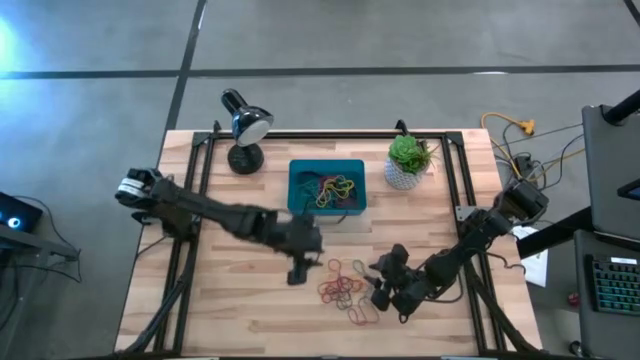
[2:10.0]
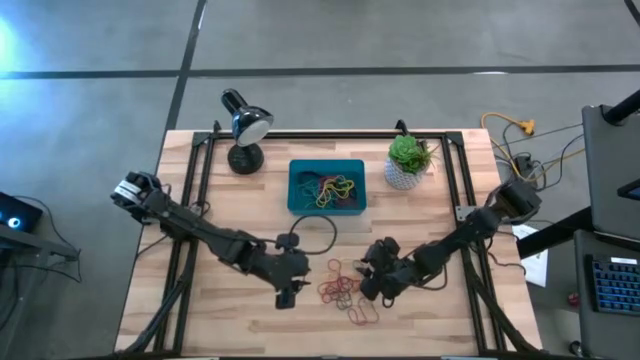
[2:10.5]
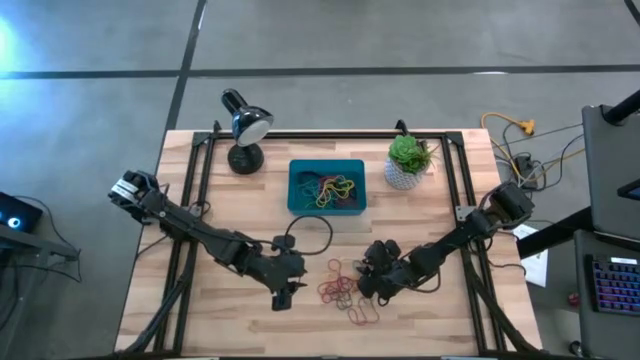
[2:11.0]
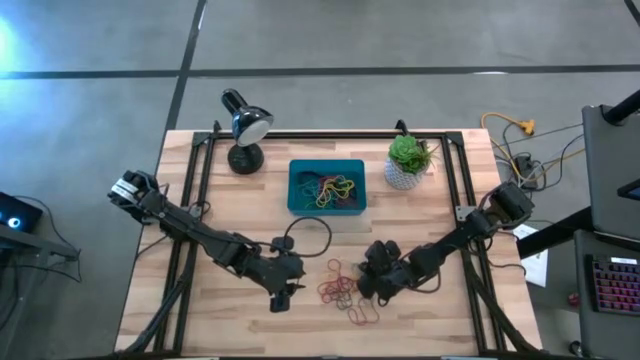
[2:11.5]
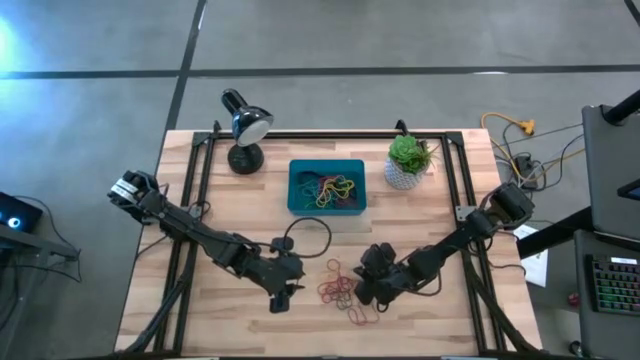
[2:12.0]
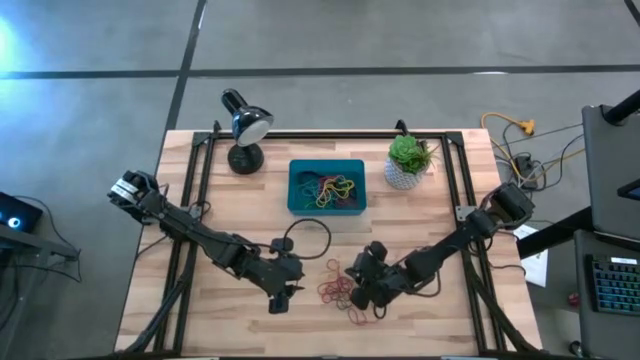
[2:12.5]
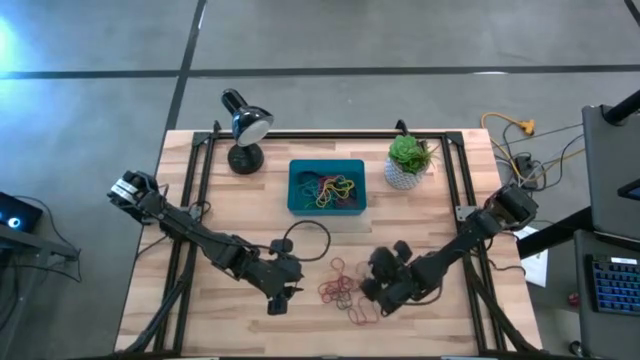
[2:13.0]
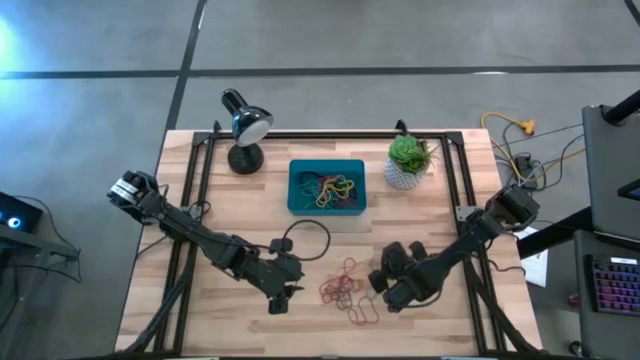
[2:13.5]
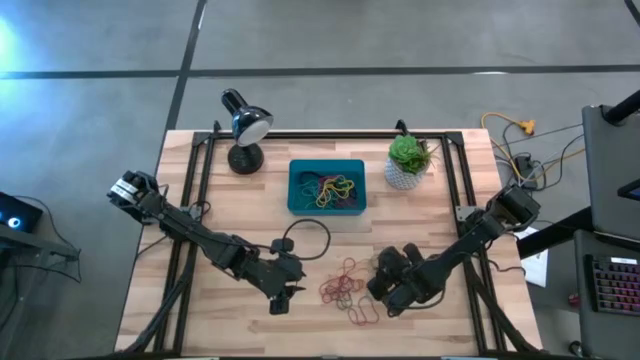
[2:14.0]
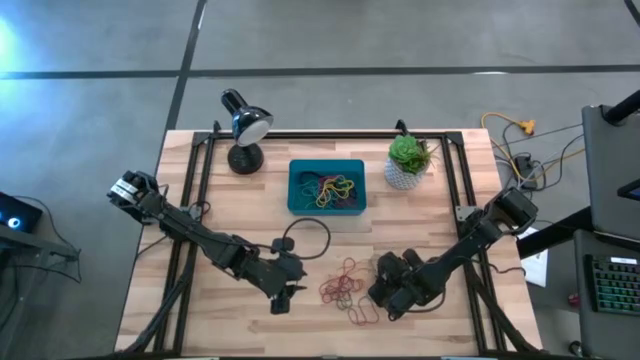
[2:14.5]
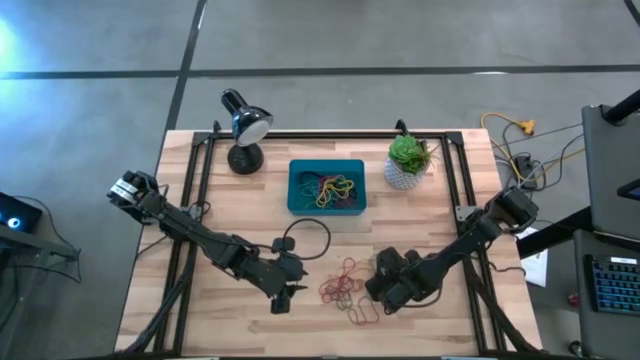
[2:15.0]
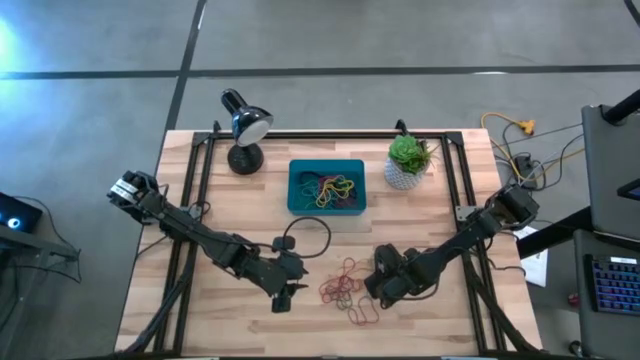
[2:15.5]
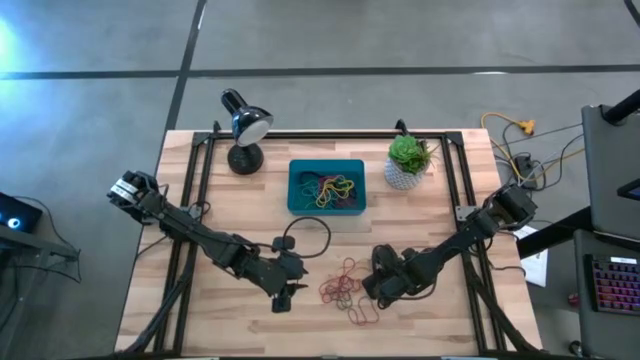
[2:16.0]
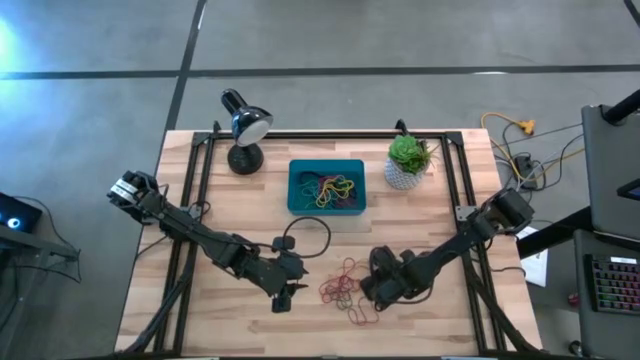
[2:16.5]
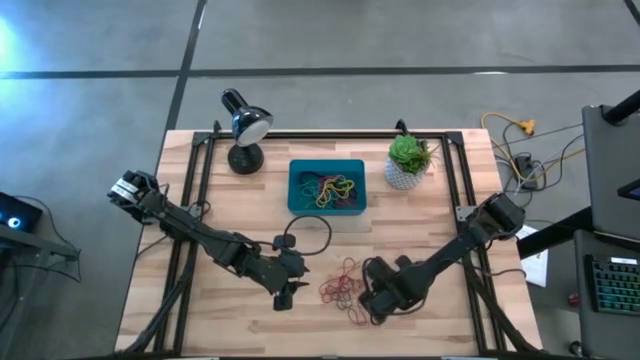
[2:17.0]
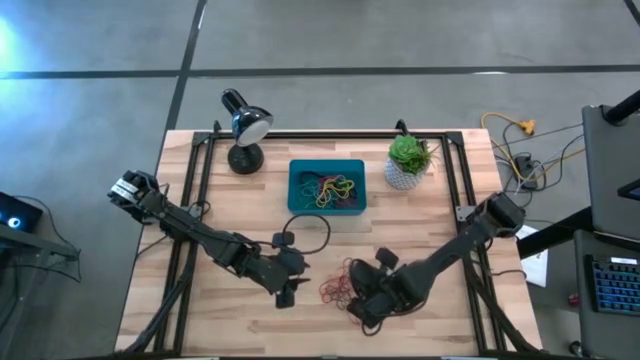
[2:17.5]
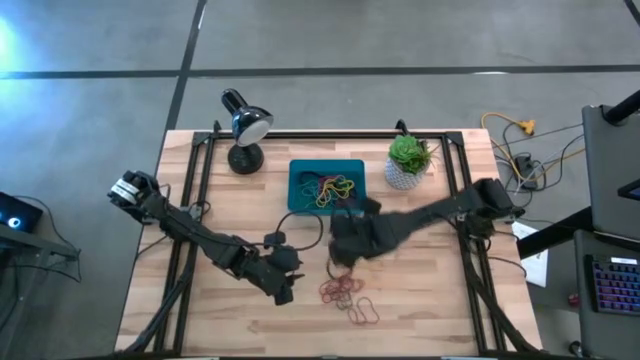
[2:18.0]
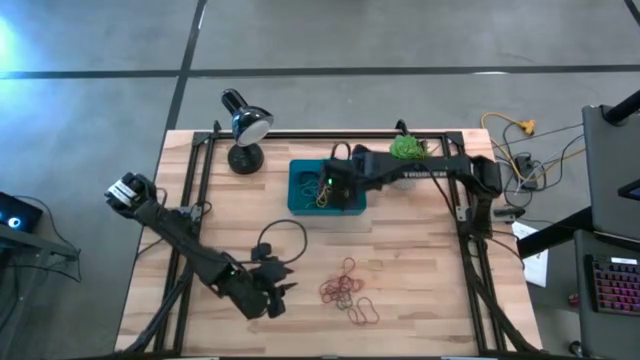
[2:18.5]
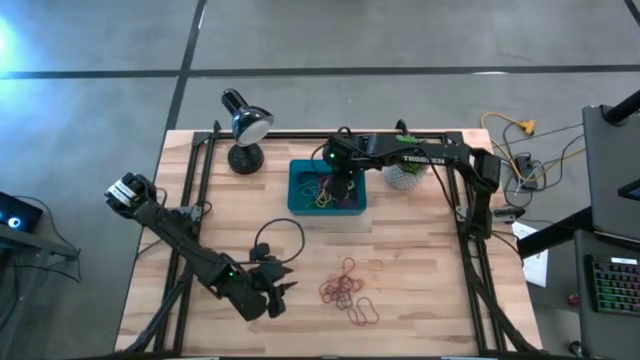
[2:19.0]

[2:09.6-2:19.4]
Task: Pick and place rubber bands into bin
Put the blue rubber band into the dark blue bin

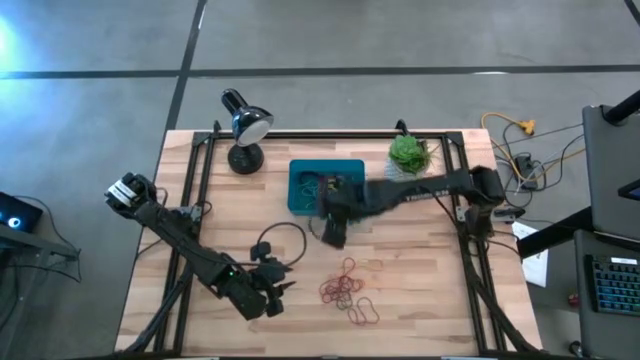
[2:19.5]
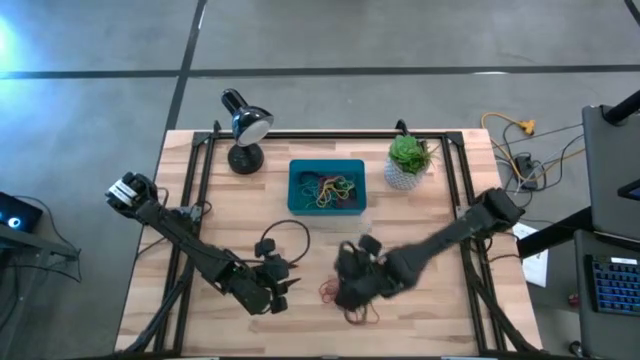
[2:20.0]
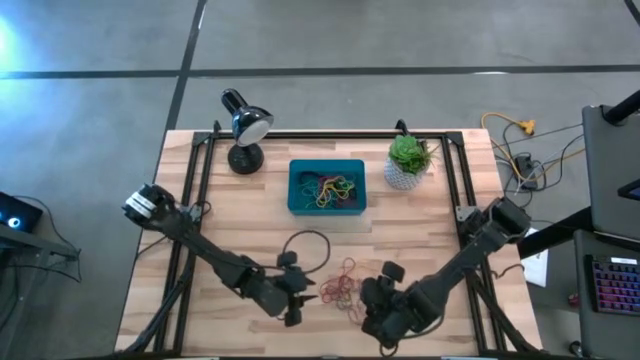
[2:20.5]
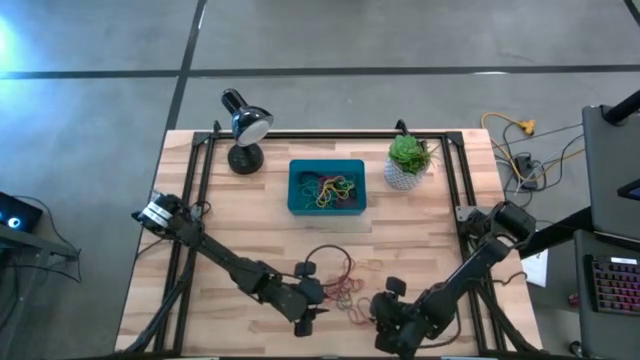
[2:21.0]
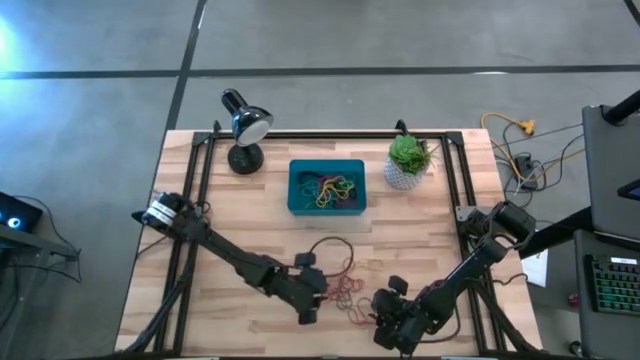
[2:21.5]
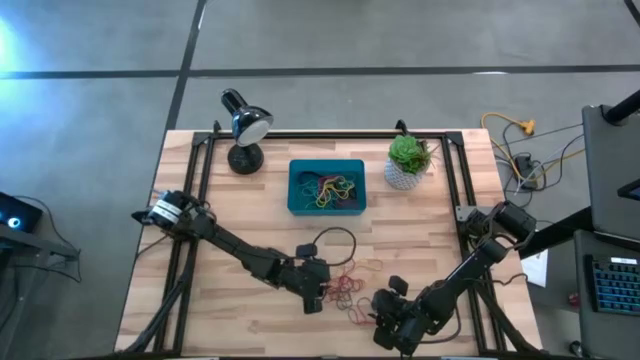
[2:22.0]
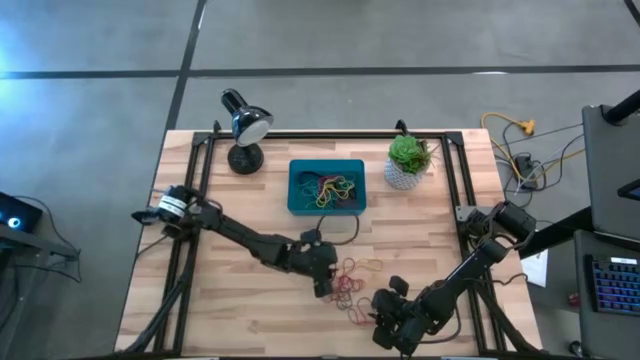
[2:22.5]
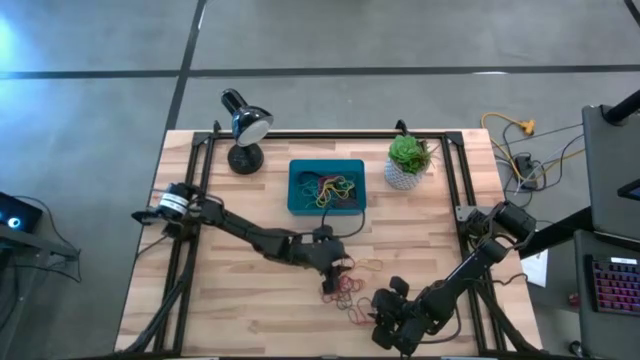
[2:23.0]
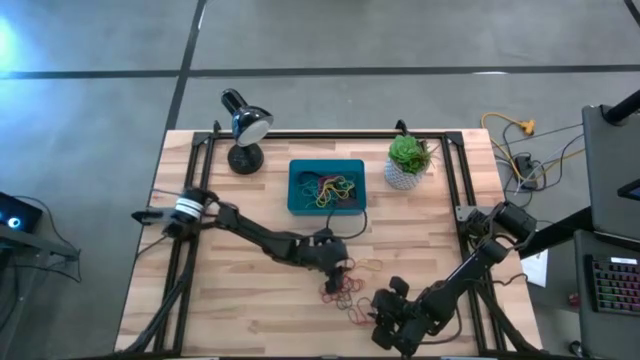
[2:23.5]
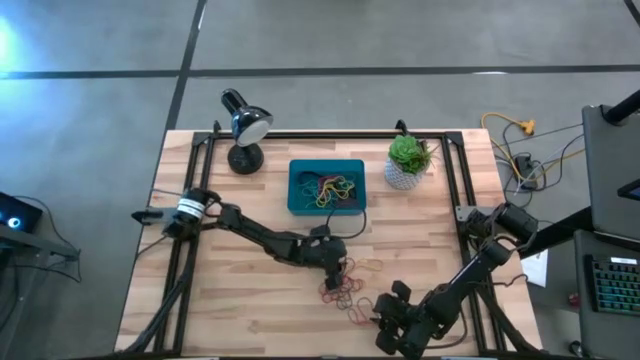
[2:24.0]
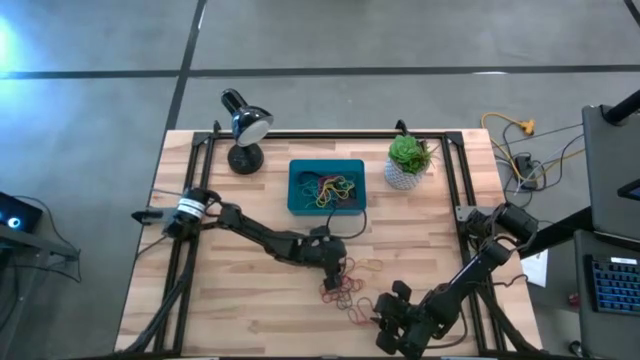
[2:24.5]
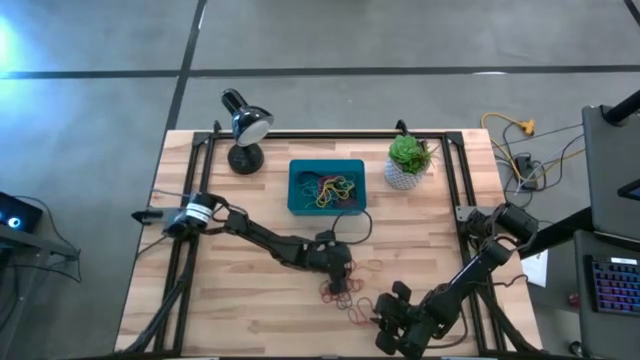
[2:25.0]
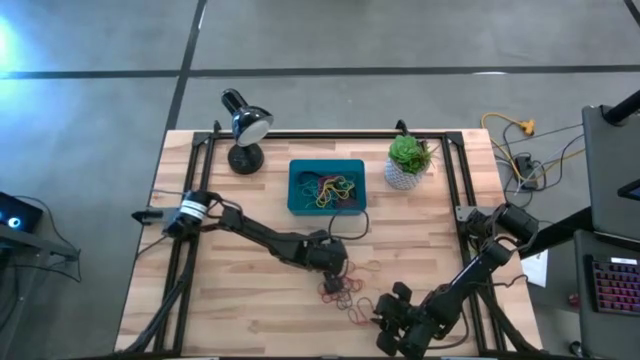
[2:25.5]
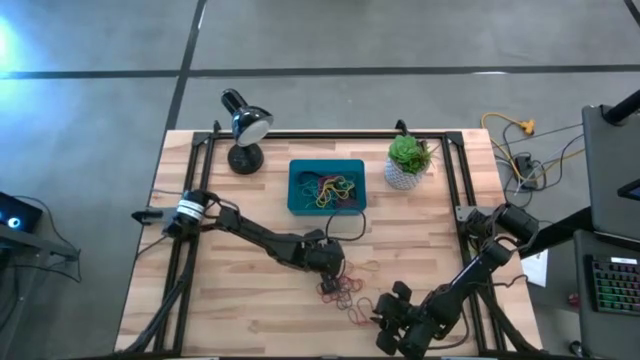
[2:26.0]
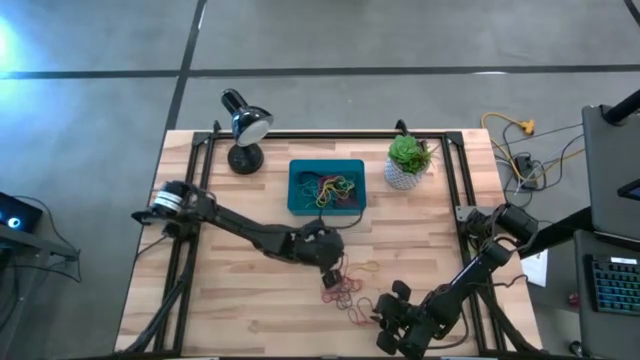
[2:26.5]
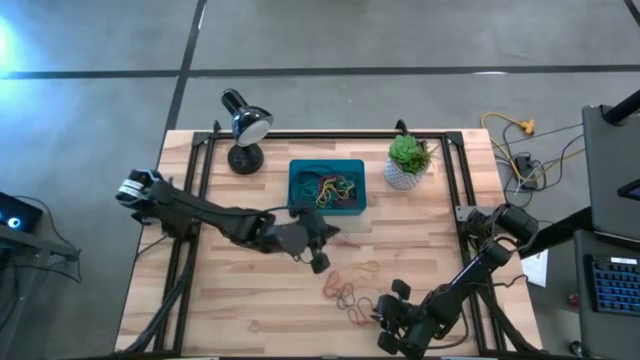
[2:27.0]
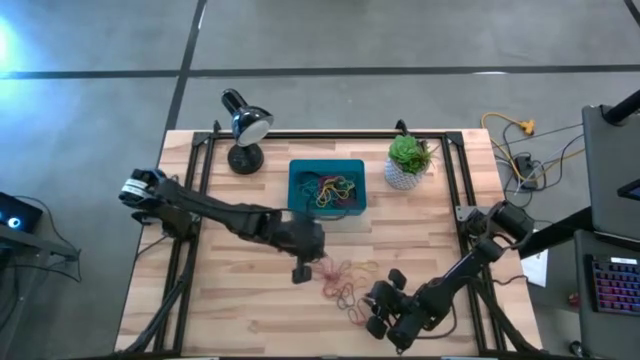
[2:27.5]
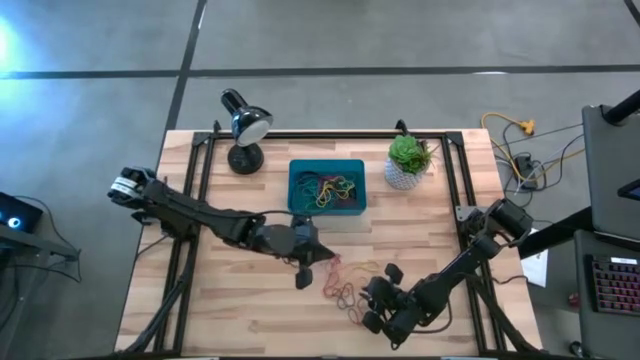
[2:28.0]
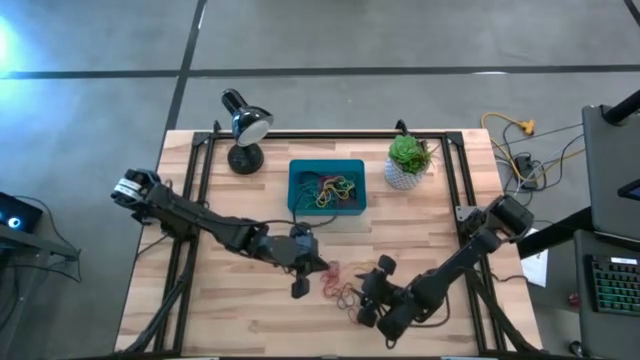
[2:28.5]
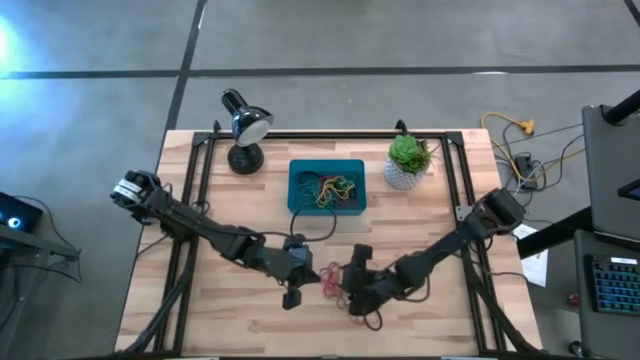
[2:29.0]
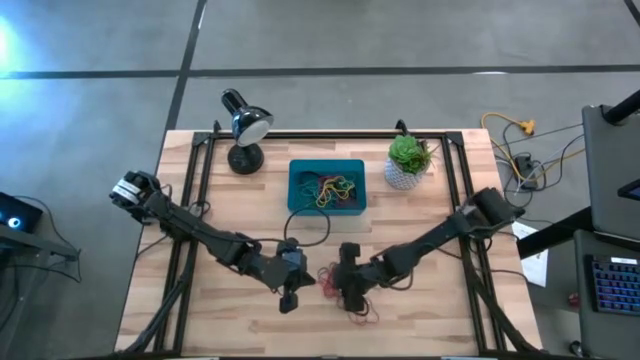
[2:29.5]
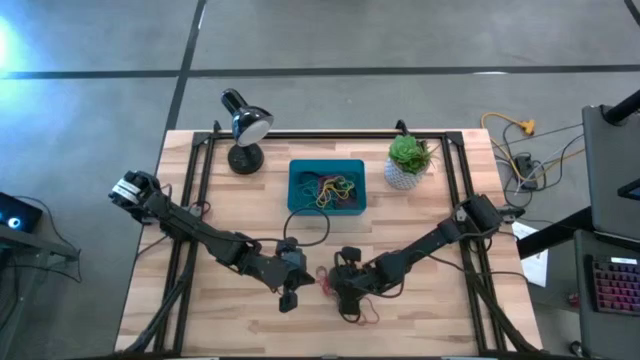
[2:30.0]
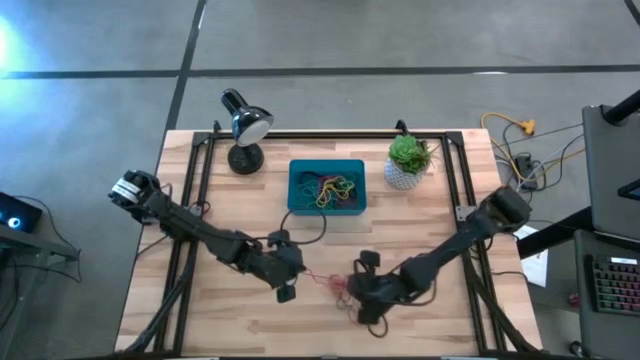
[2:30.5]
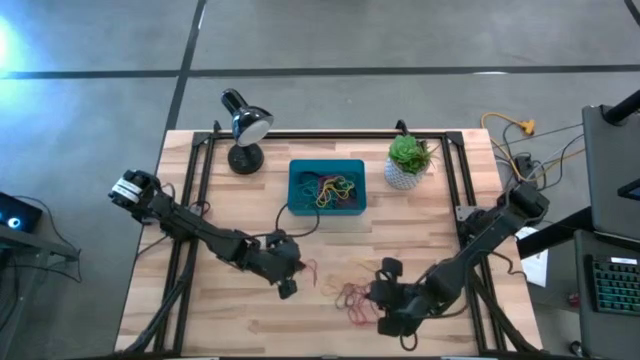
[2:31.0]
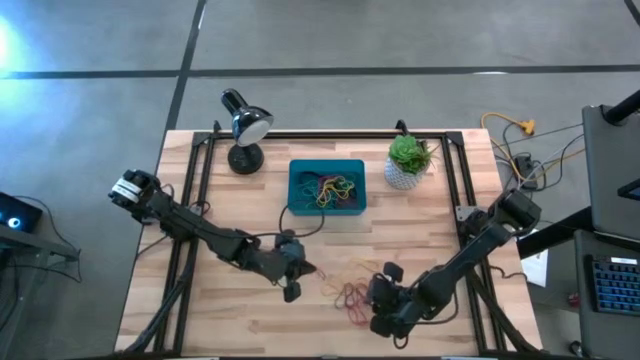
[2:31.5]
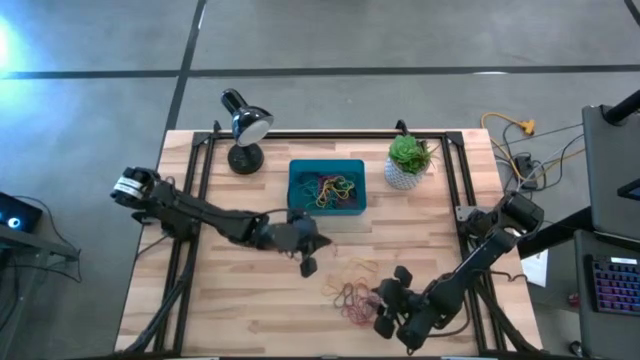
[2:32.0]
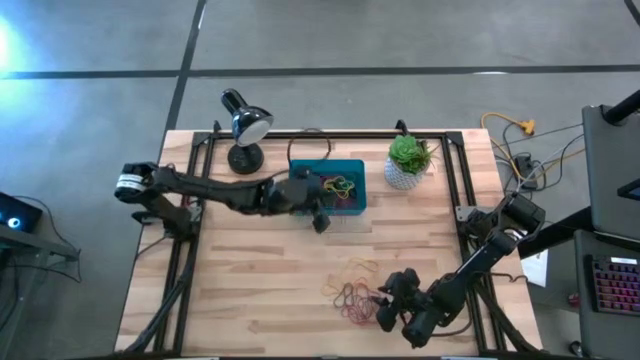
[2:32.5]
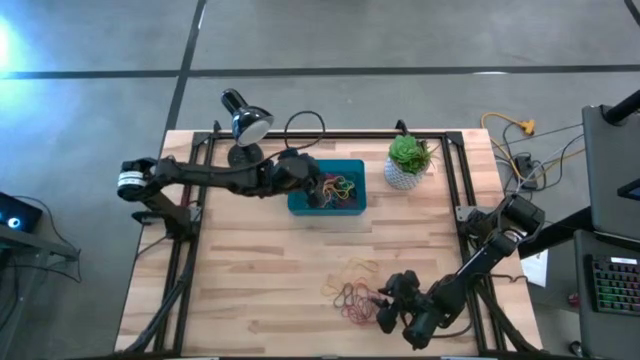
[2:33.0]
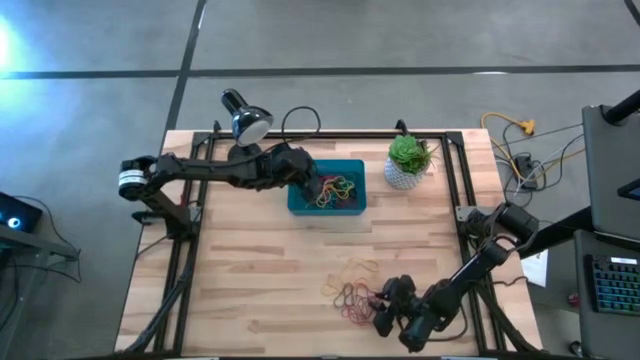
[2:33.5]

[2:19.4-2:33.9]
Put the red rubber band into the dark blue bin
